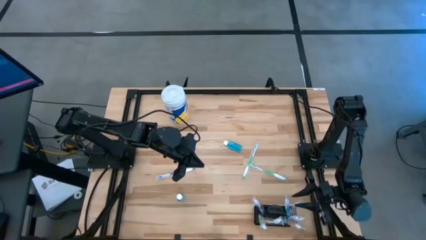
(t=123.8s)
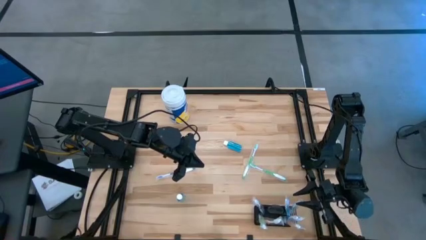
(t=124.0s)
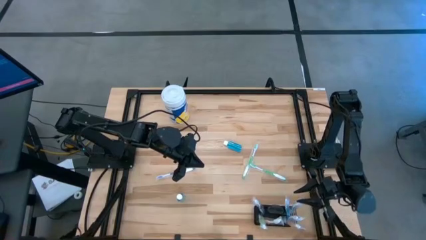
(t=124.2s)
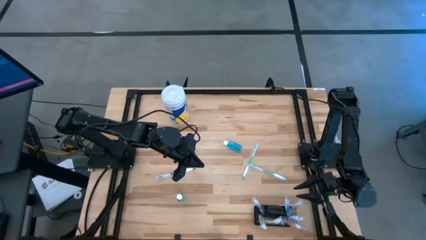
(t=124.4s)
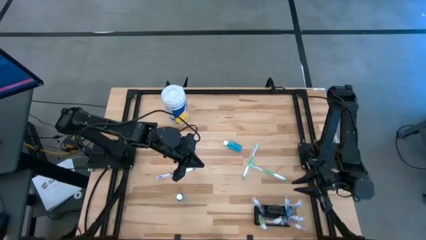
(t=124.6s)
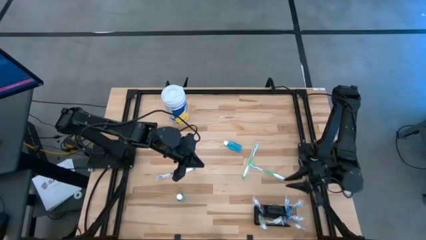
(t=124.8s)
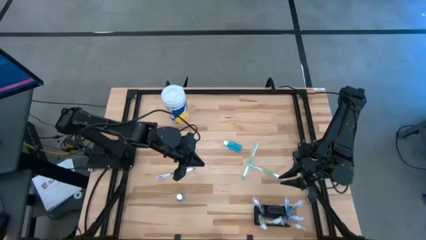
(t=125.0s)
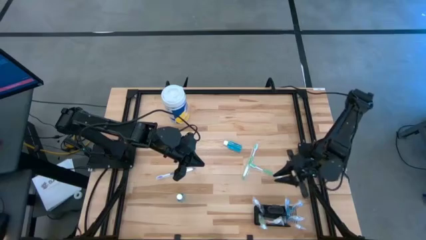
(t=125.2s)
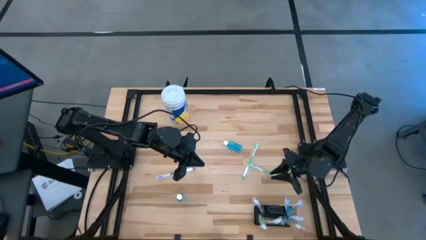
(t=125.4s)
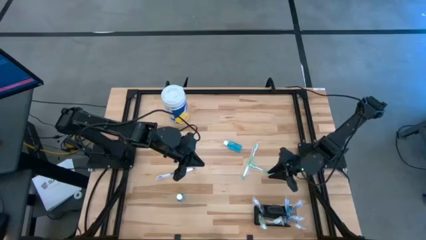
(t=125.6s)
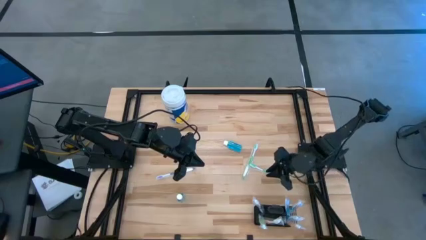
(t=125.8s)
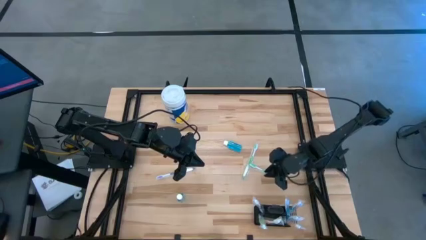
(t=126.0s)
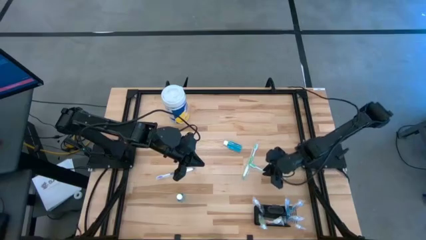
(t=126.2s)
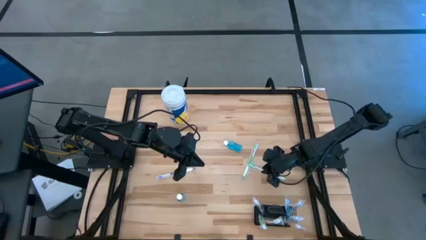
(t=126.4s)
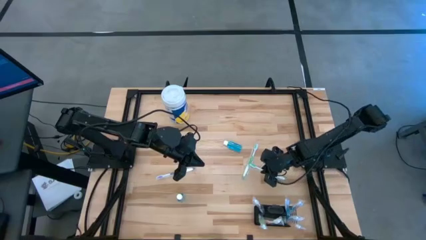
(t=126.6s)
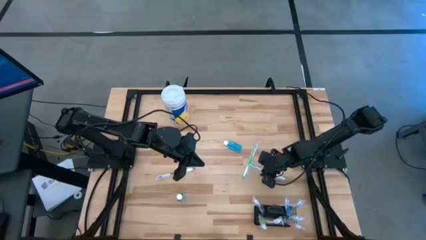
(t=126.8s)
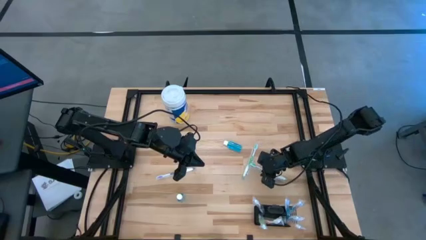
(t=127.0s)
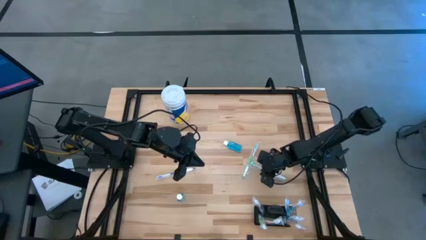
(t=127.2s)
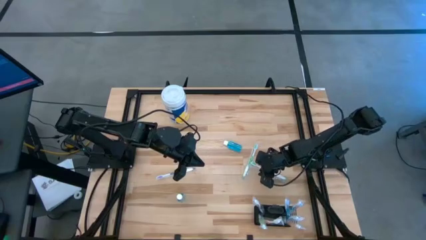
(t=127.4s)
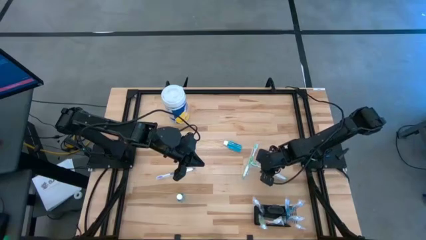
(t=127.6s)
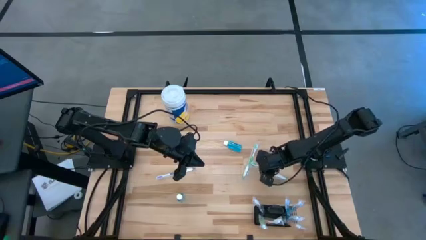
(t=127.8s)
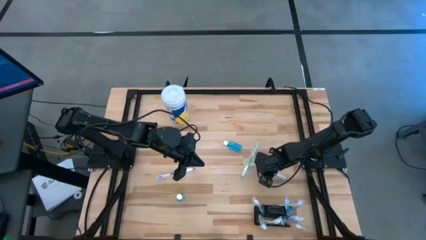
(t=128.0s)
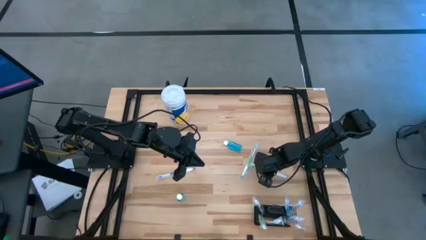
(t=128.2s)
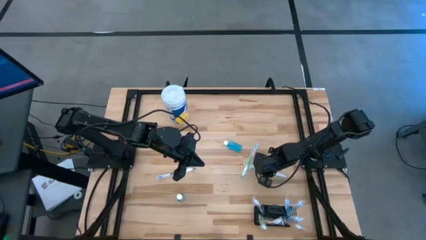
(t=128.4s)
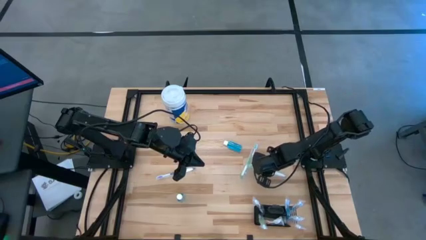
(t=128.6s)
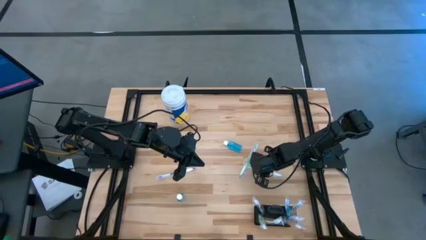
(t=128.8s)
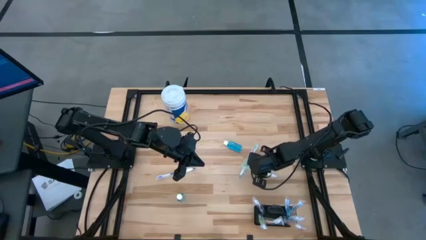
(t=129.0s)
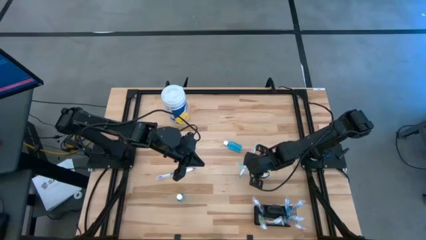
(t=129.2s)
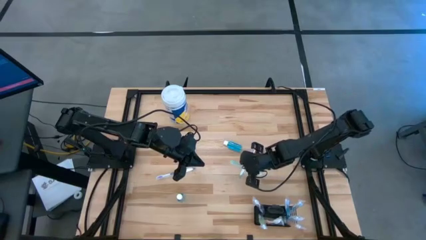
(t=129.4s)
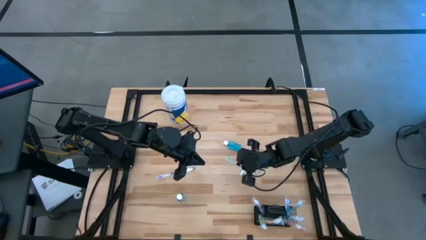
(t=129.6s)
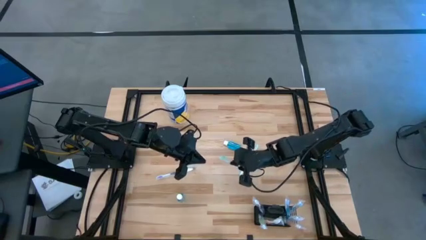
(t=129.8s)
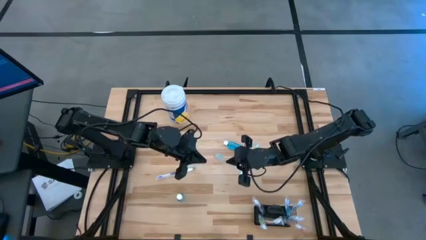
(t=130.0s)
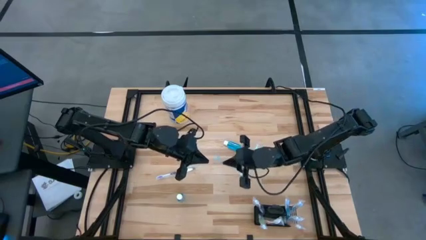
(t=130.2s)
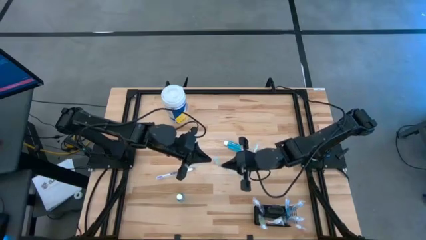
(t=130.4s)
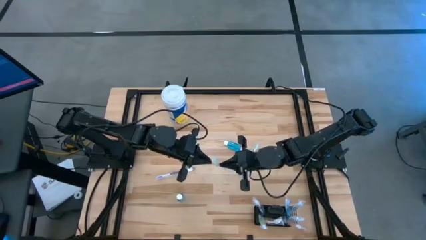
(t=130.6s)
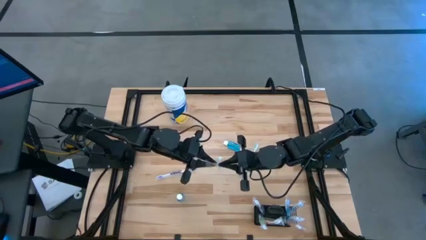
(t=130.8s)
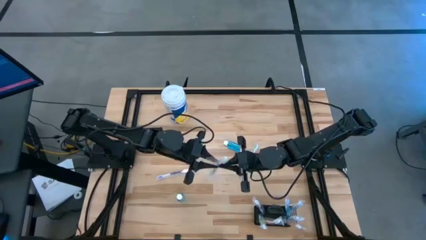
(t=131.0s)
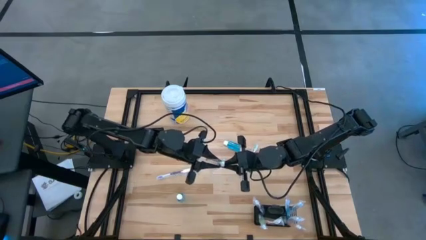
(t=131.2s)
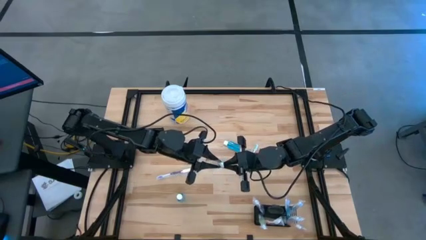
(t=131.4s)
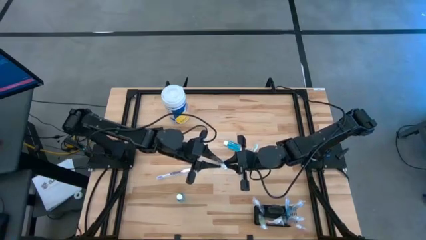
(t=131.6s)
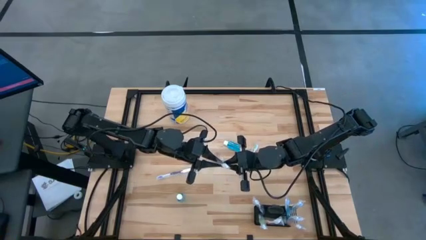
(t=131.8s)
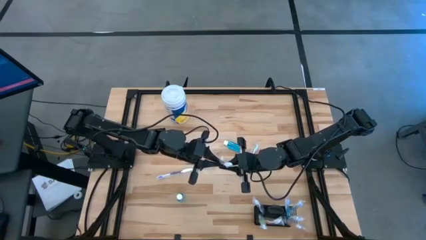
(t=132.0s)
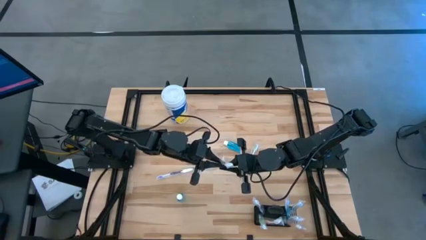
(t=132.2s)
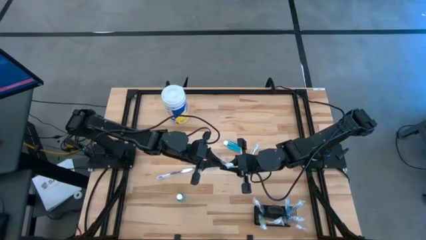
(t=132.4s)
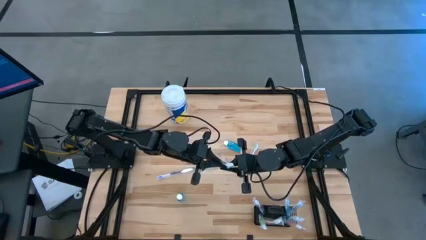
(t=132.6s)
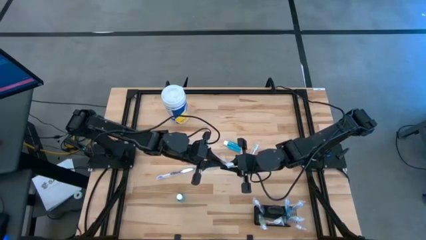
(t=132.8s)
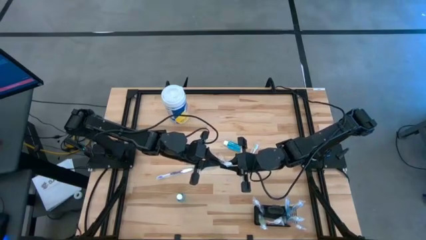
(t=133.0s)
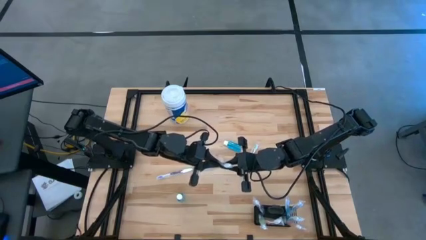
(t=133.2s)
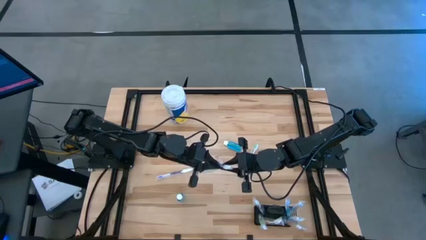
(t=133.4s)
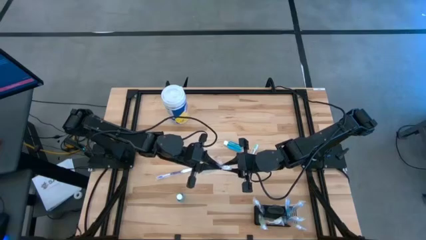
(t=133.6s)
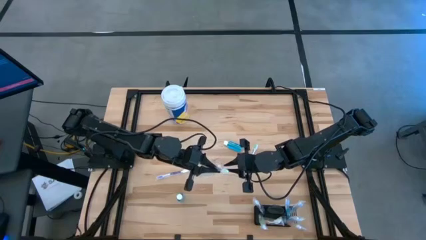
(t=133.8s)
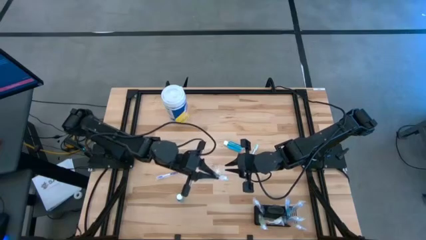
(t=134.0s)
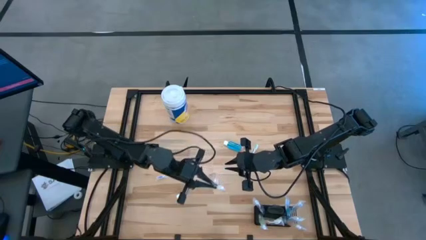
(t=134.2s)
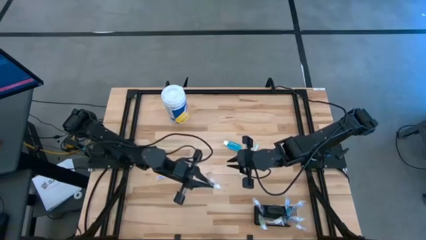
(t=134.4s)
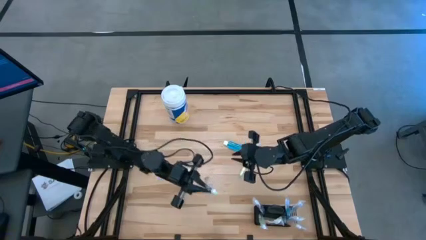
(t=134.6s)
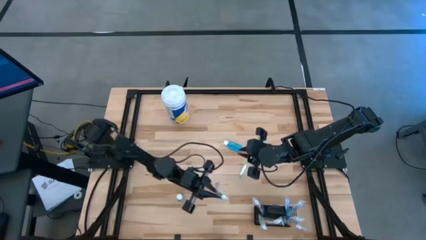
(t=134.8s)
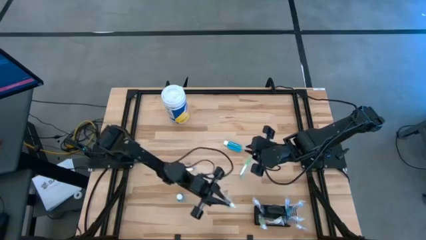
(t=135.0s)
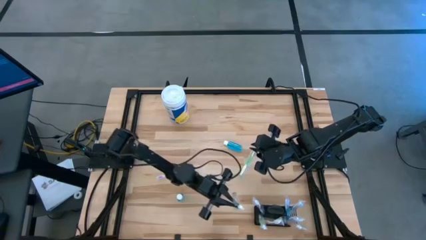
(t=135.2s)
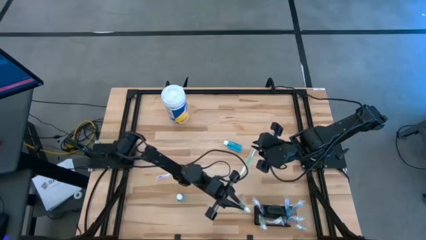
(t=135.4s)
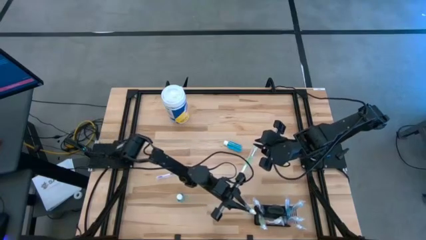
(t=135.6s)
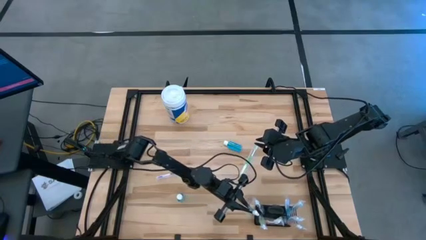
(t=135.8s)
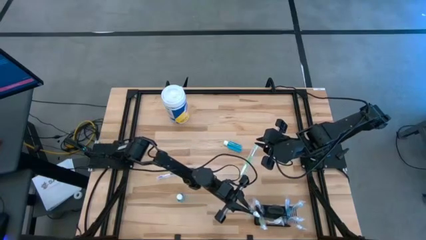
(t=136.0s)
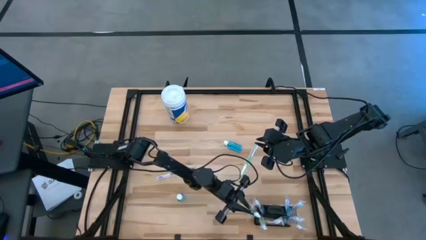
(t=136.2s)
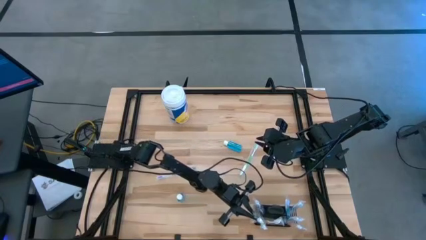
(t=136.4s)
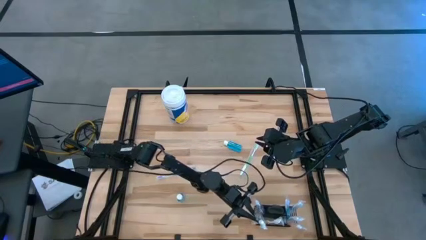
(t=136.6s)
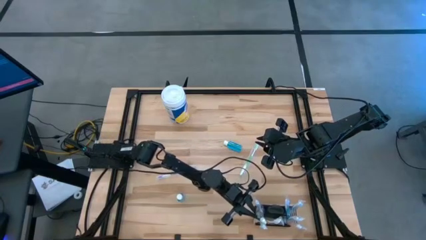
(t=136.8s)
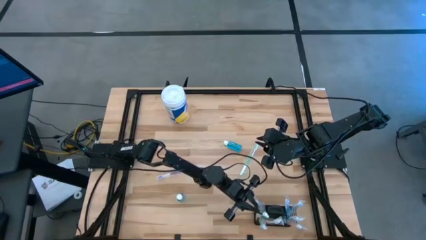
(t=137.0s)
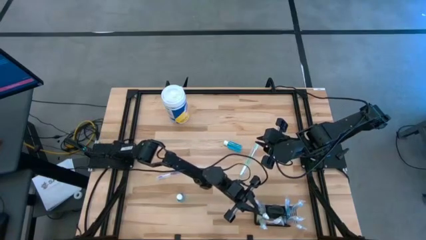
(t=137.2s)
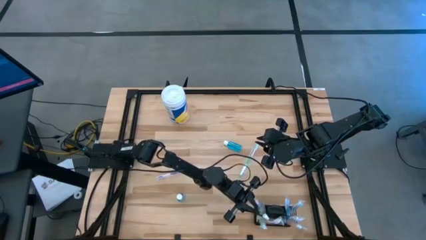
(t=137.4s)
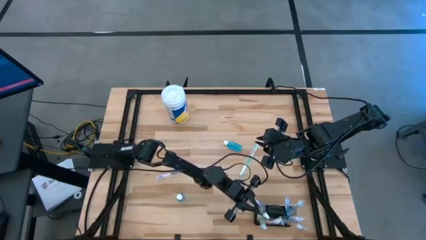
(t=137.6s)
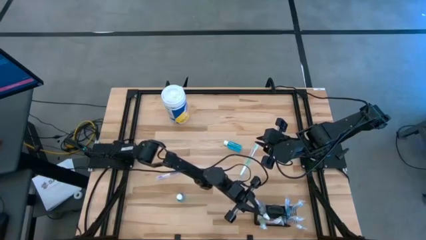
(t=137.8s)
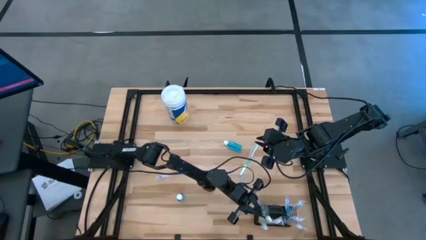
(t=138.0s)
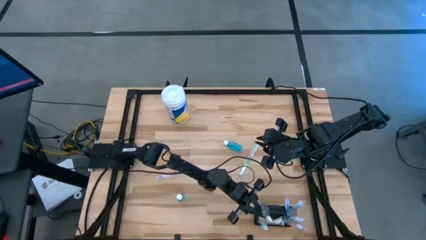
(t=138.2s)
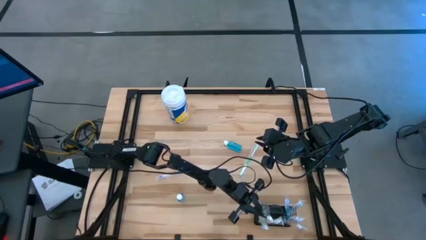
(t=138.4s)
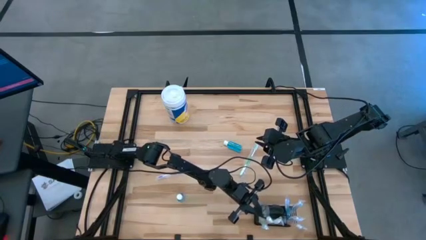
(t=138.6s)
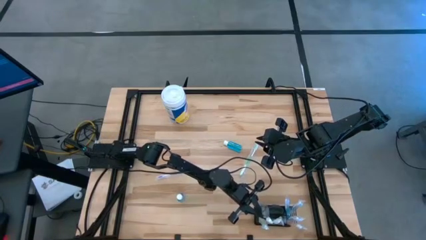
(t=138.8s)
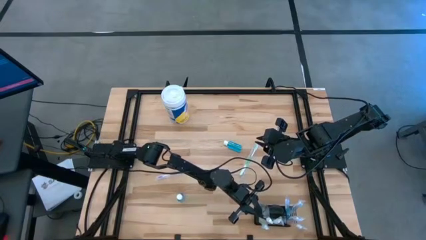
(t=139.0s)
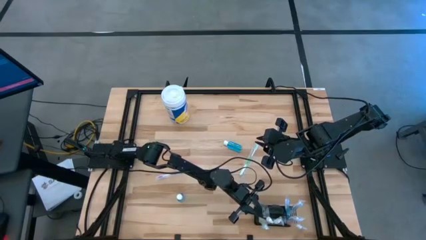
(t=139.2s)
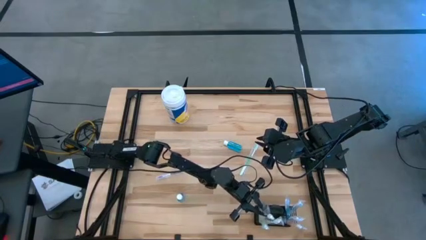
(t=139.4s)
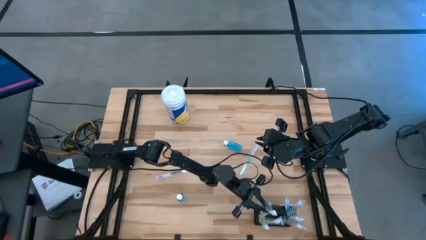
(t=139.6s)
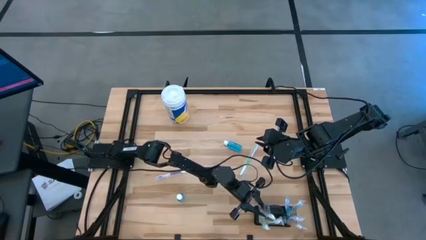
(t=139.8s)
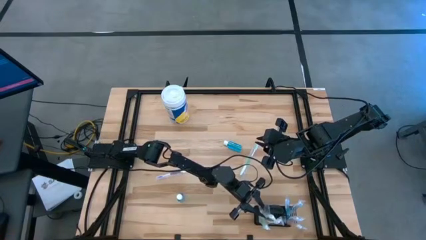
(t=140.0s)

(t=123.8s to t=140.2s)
Task: Pick & Place toothbrushing station
Put the right green toothbrush into the wire organizer
